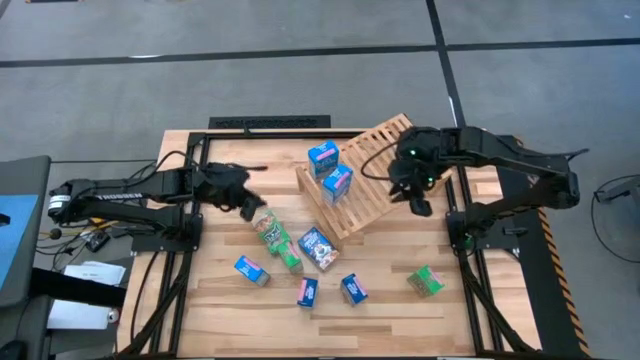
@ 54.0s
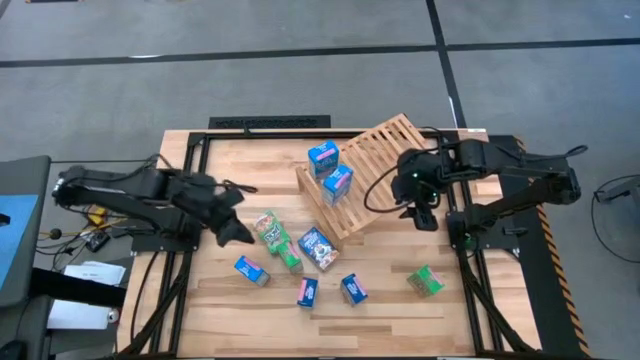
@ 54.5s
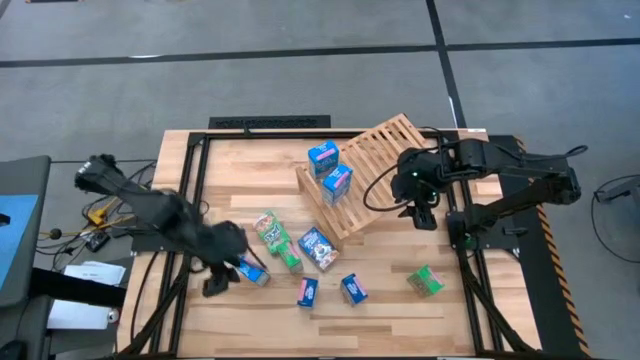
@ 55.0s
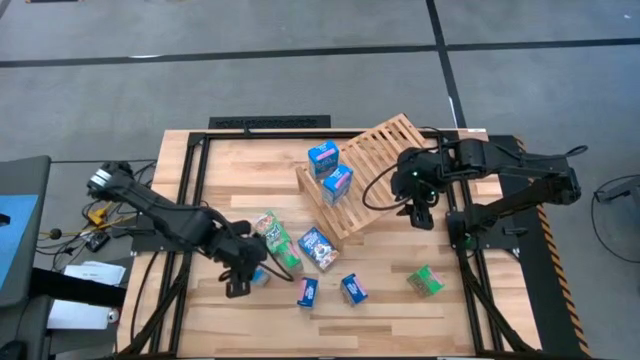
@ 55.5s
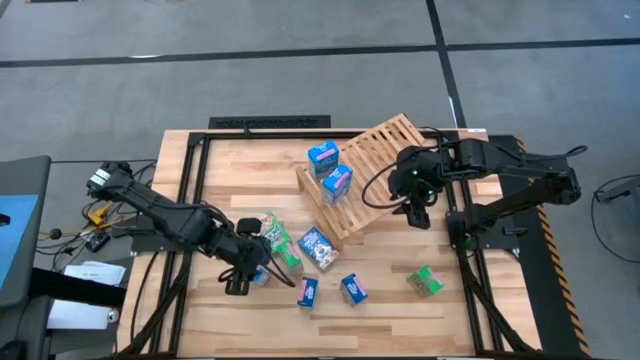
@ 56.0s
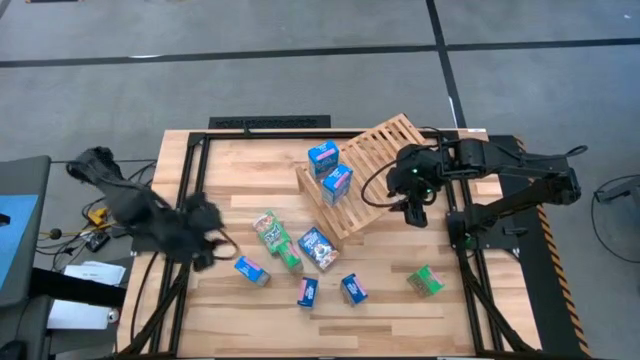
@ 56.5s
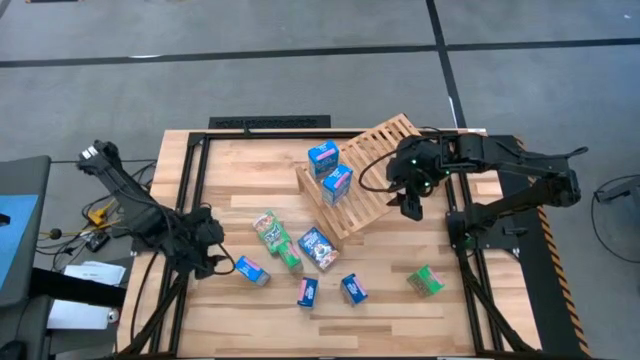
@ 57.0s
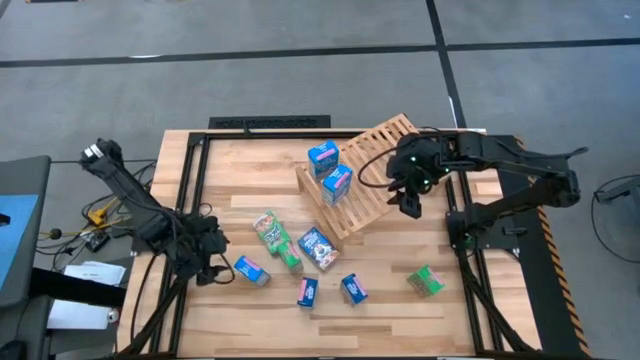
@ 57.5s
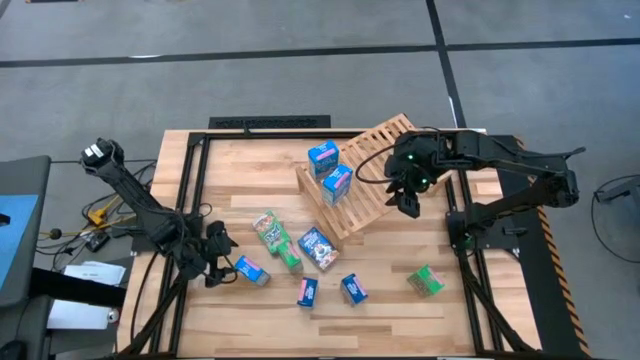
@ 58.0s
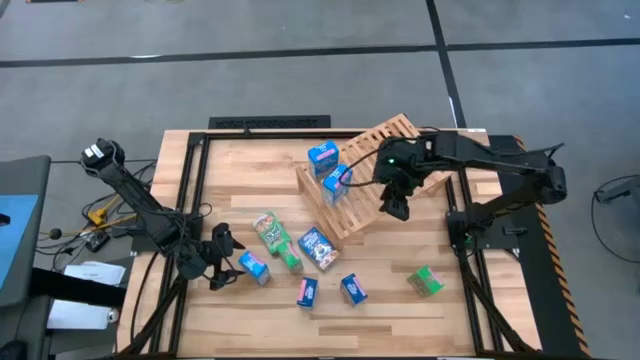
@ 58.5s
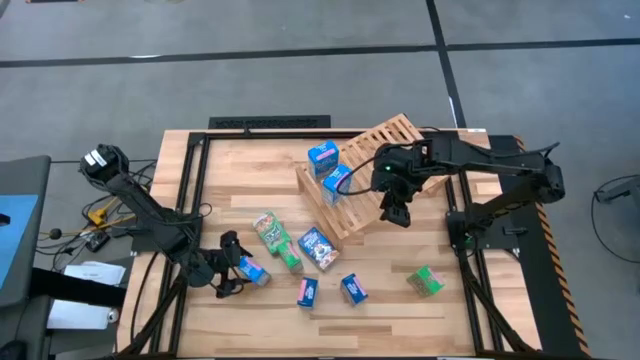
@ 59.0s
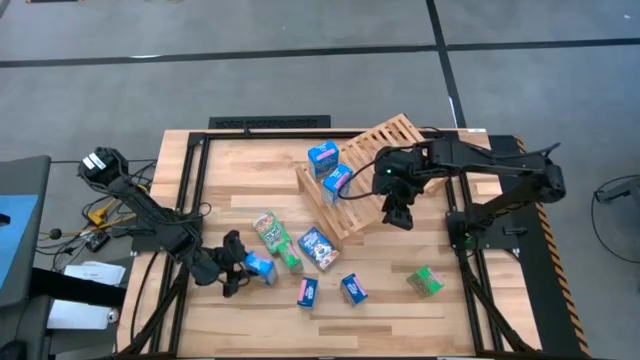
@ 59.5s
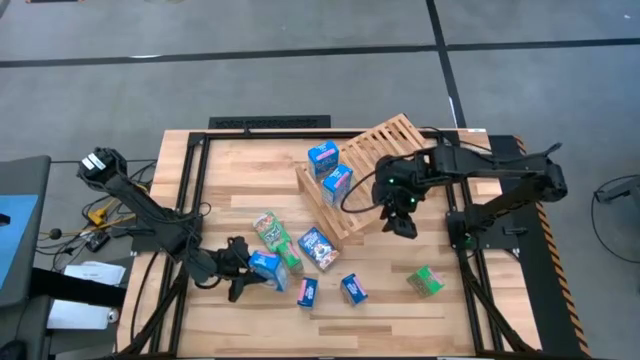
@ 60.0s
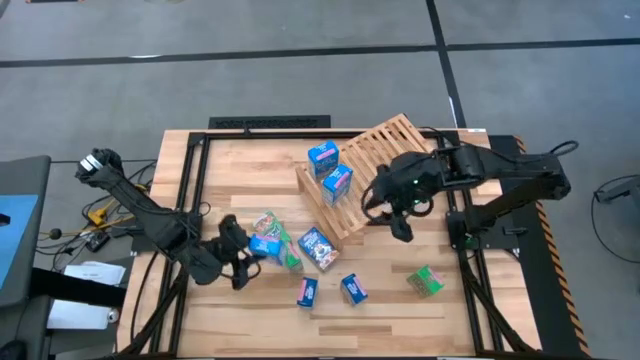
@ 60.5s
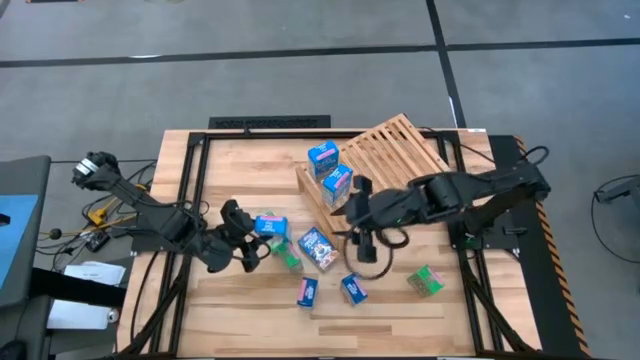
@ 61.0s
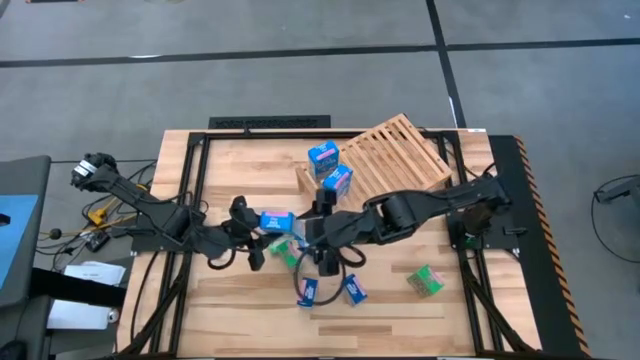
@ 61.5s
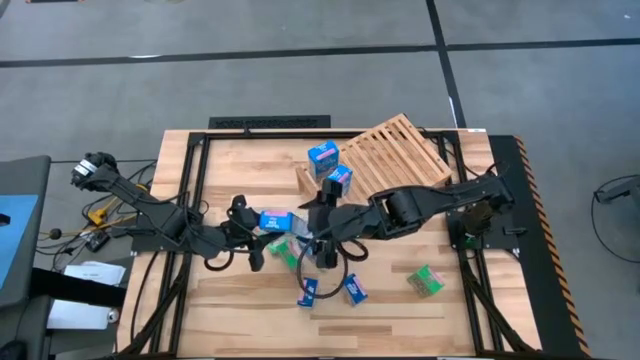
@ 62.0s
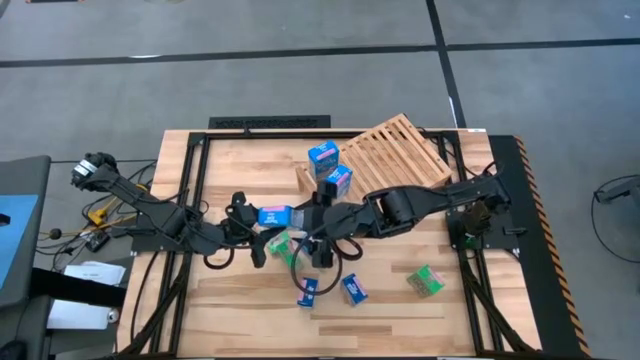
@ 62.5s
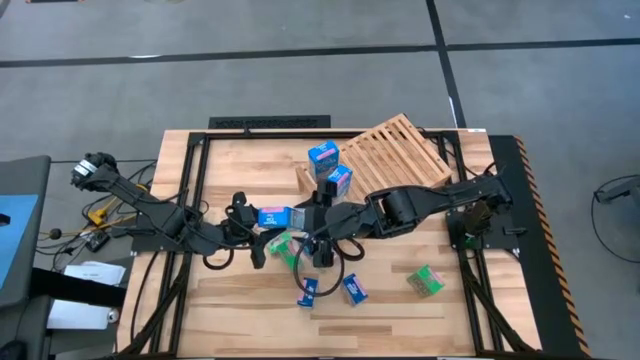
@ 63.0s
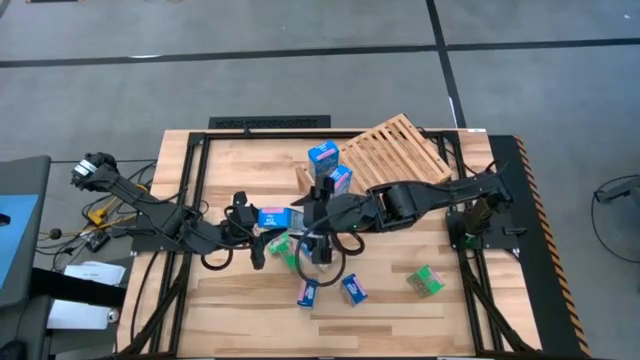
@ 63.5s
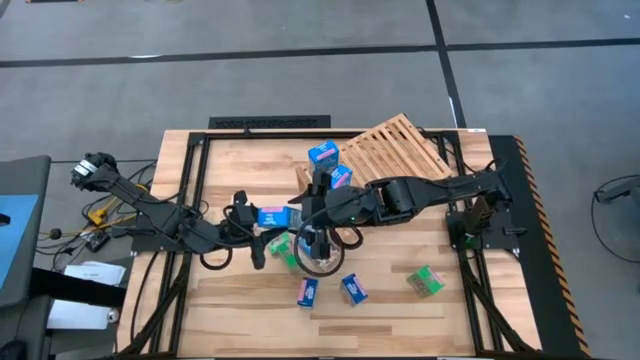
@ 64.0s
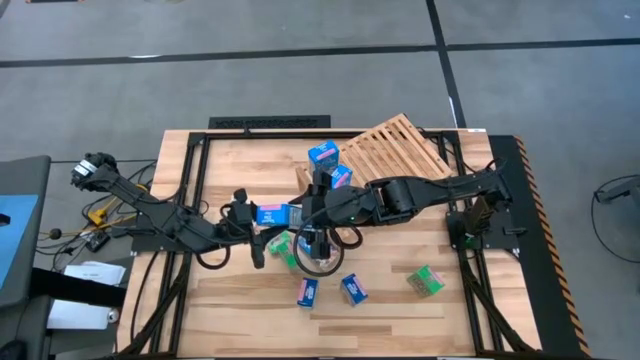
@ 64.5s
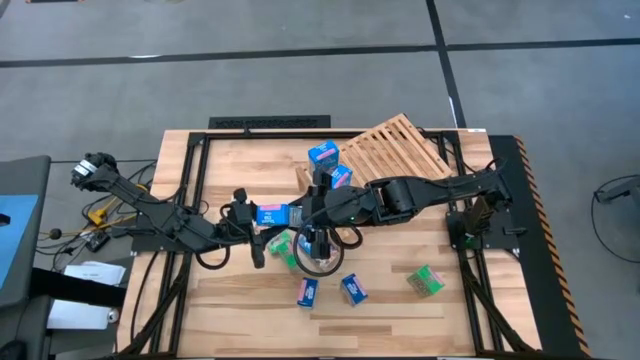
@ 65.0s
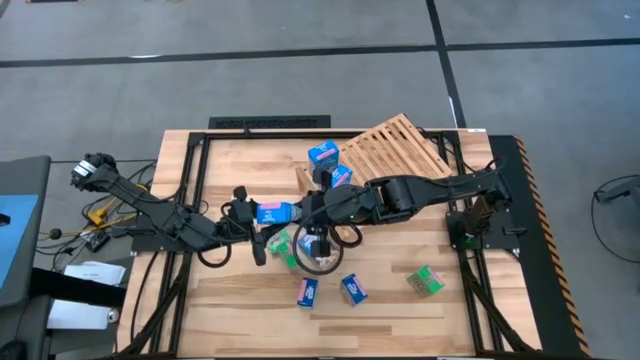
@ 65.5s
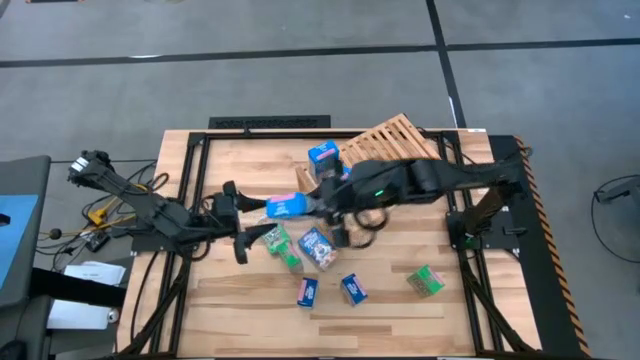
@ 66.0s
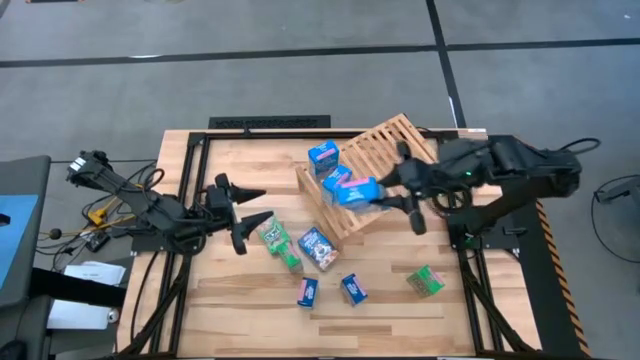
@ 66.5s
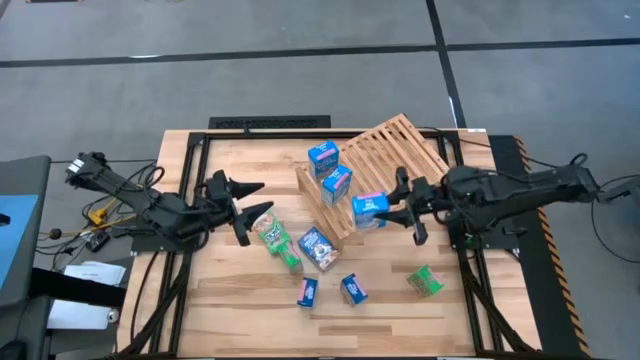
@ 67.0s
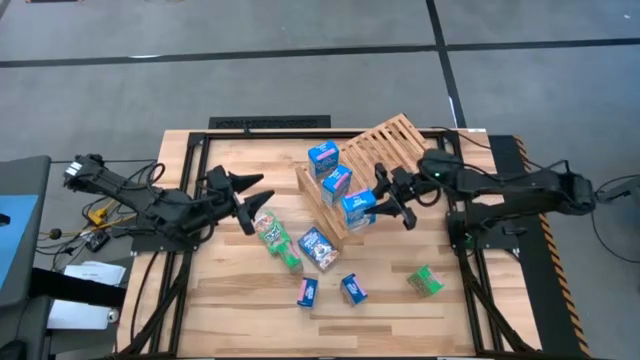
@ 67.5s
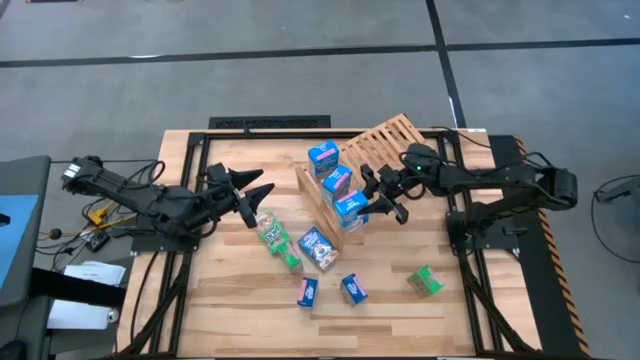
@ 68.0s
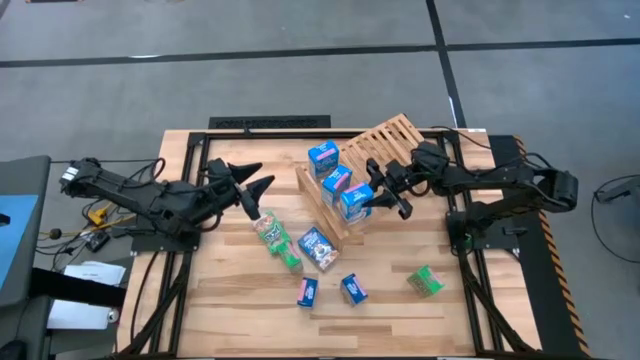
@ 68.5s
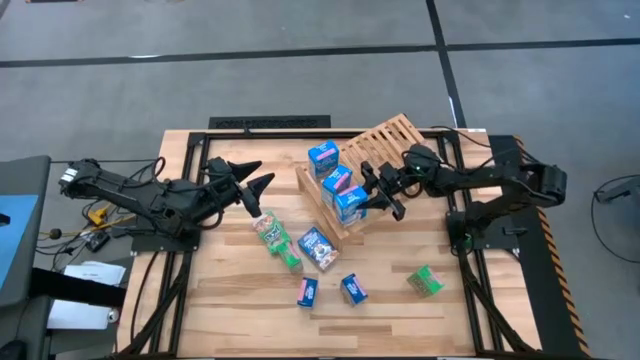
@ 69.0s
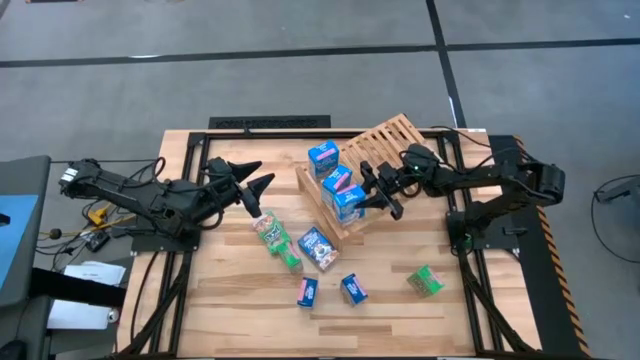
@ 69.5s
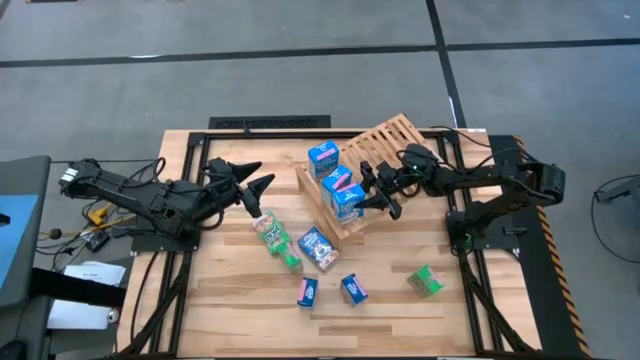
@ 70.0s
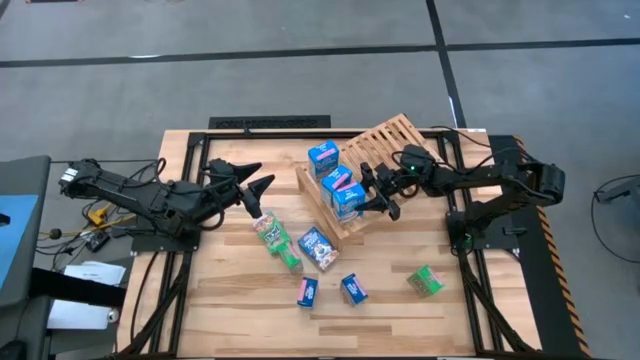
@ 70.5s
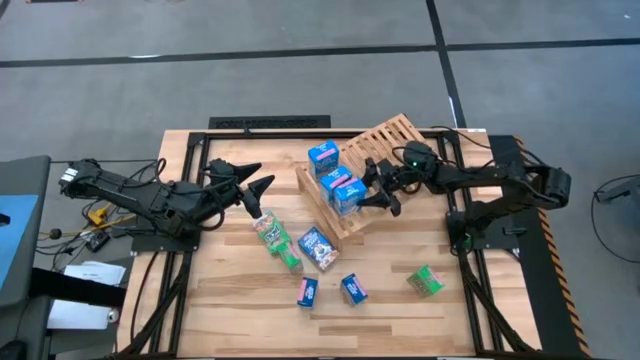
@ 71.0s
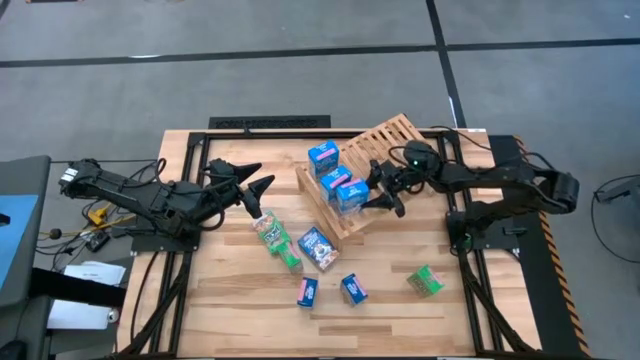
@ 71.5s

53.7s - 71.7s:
Task: Stack cereal on shelf
Put the light blue cereal box aligned with the other light blue cereal boxes on the shelf

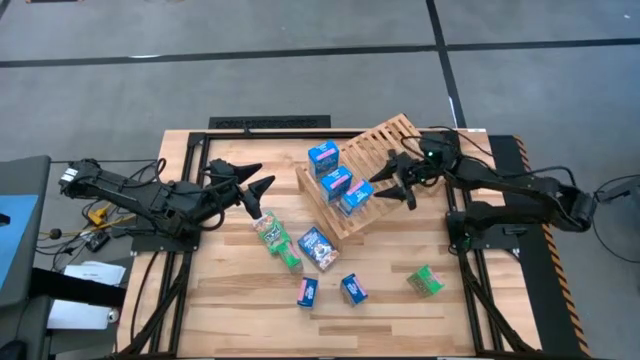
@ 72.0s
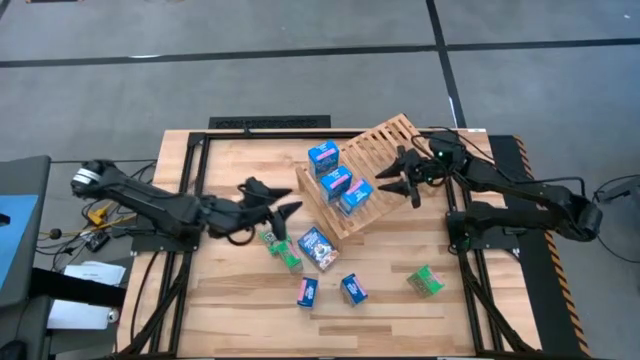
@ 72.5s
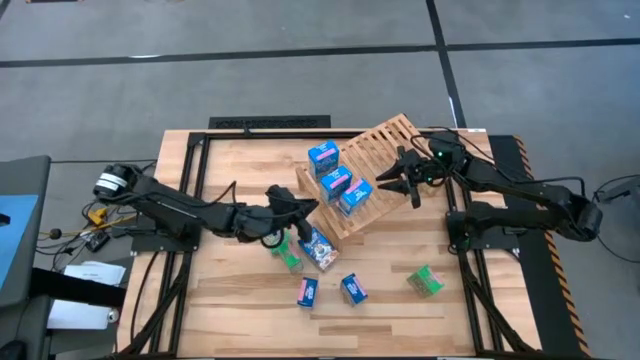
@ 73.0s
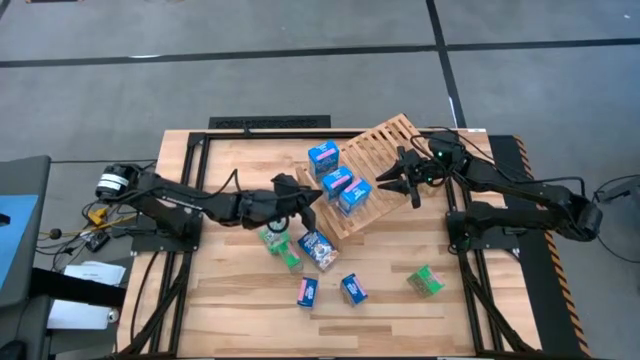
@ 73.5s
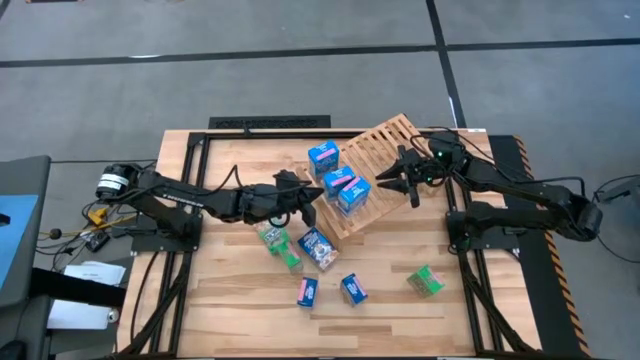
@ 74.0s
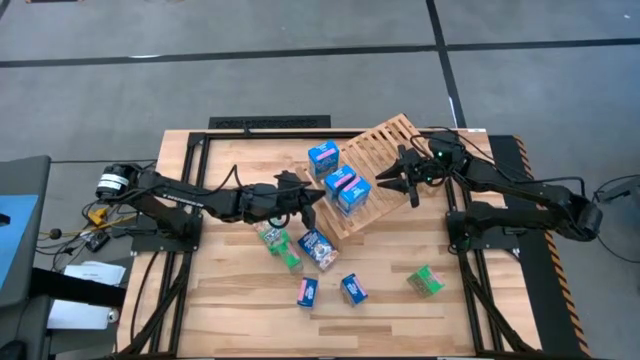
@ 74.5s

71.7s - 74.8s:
Adjust the middle blue cereal box on the shelf
